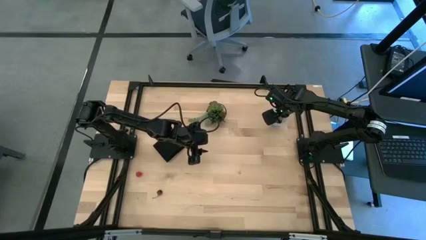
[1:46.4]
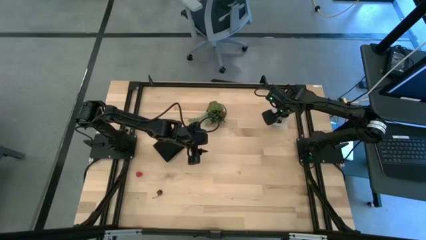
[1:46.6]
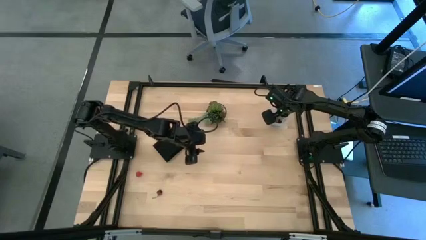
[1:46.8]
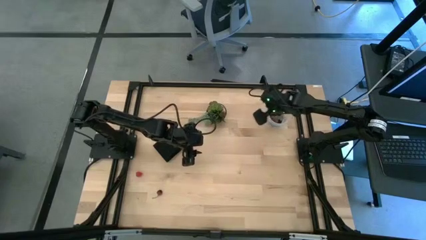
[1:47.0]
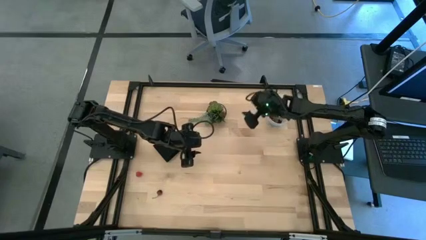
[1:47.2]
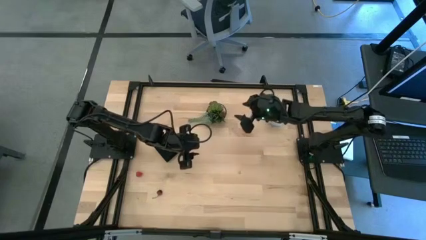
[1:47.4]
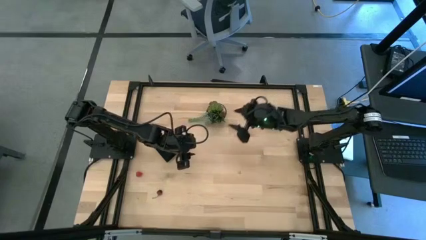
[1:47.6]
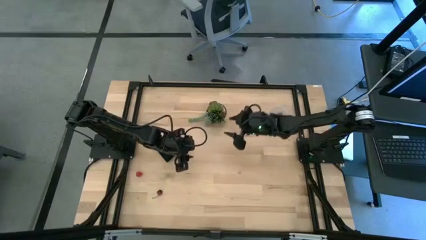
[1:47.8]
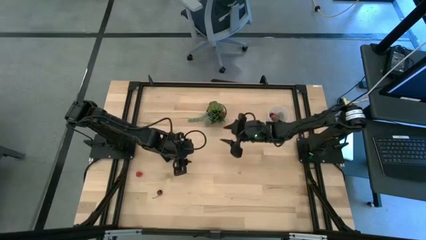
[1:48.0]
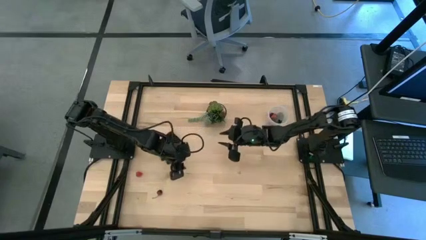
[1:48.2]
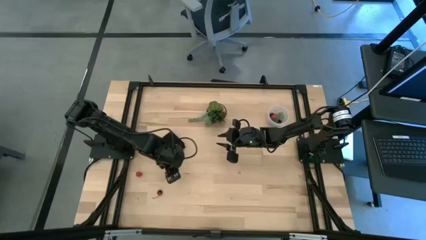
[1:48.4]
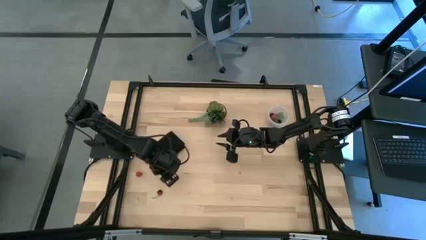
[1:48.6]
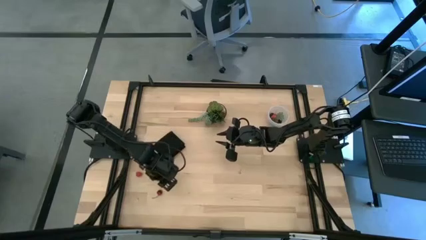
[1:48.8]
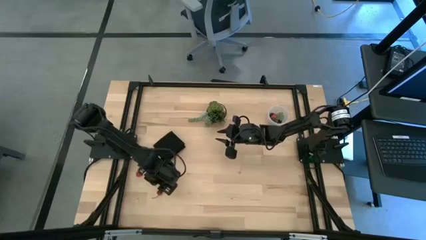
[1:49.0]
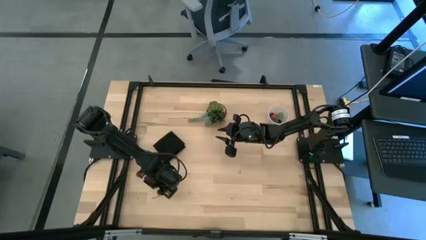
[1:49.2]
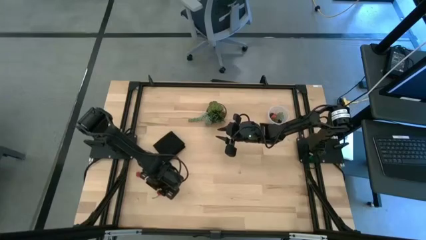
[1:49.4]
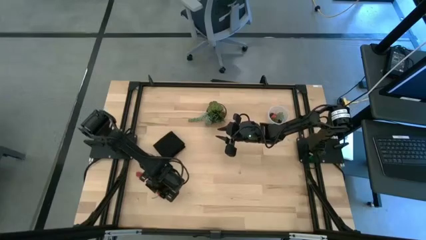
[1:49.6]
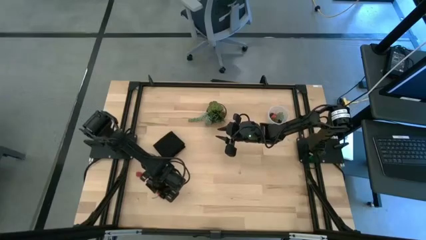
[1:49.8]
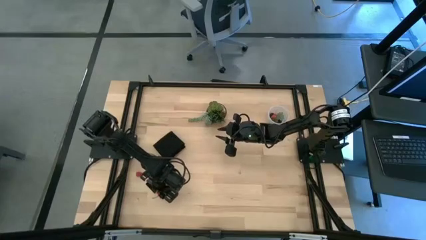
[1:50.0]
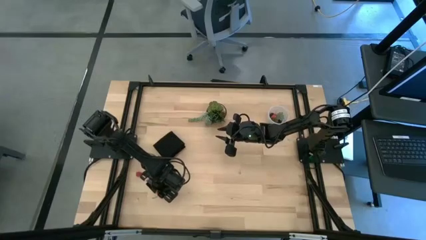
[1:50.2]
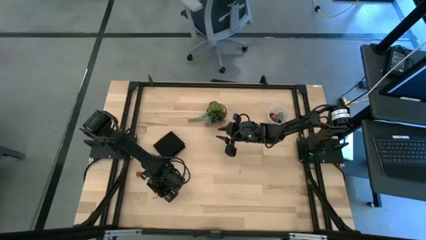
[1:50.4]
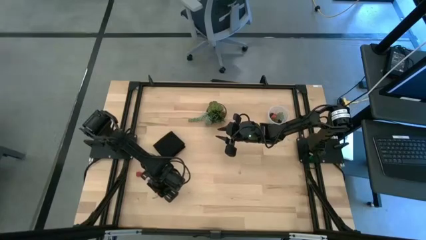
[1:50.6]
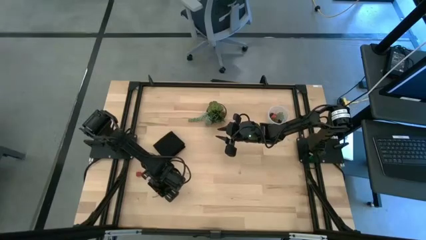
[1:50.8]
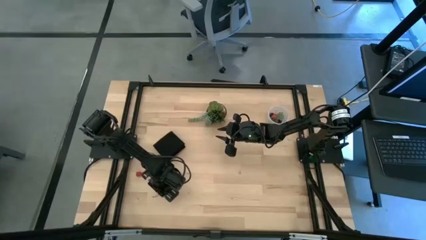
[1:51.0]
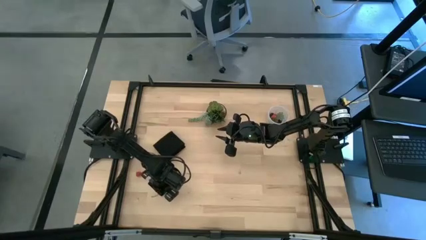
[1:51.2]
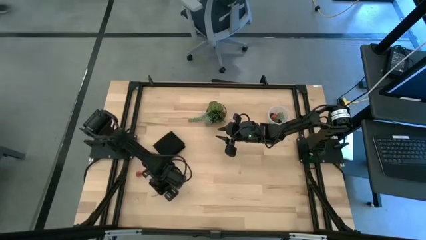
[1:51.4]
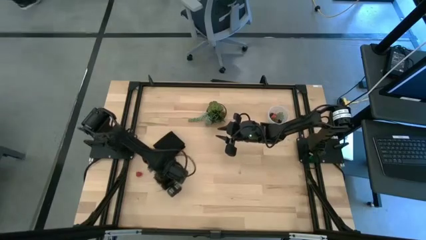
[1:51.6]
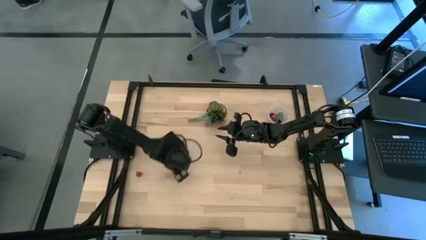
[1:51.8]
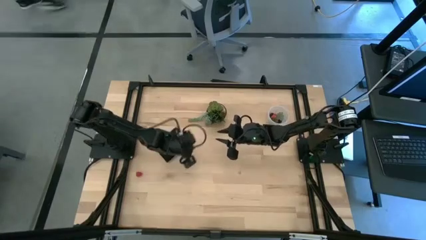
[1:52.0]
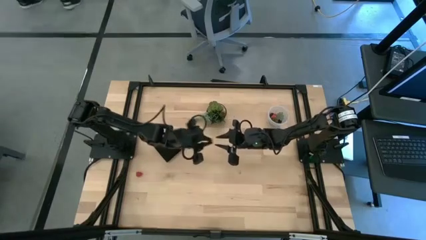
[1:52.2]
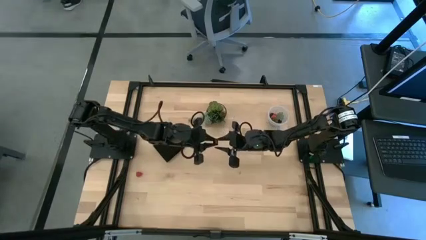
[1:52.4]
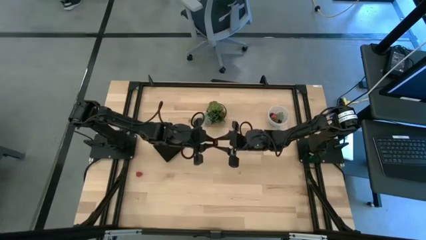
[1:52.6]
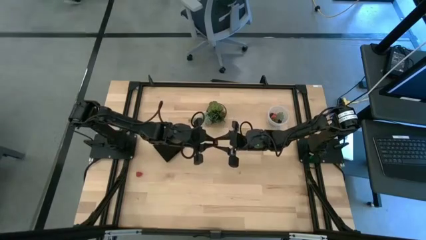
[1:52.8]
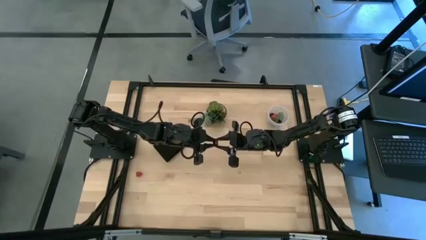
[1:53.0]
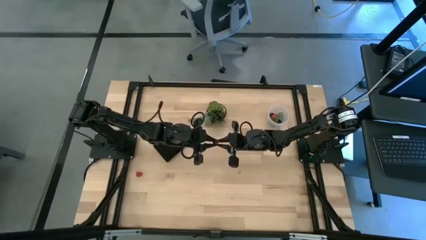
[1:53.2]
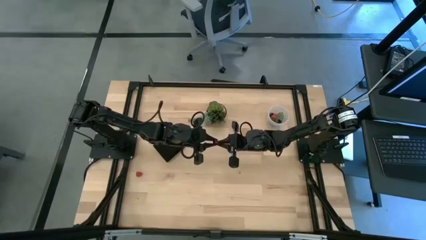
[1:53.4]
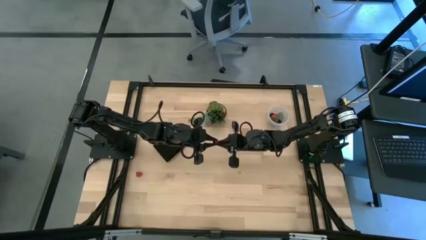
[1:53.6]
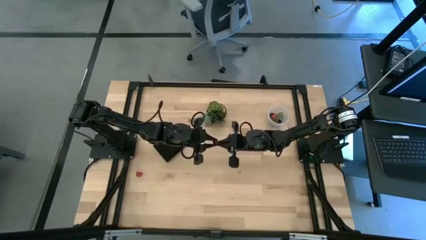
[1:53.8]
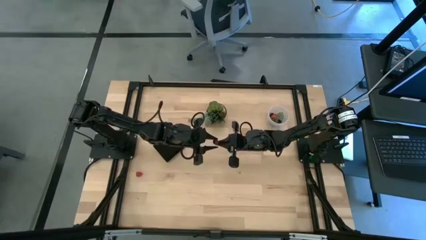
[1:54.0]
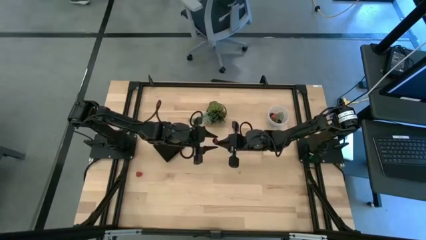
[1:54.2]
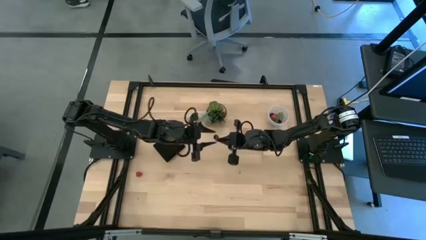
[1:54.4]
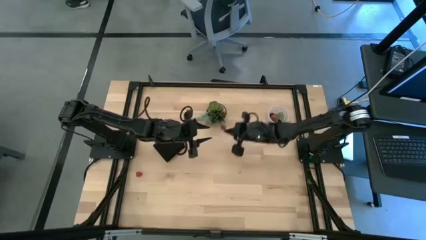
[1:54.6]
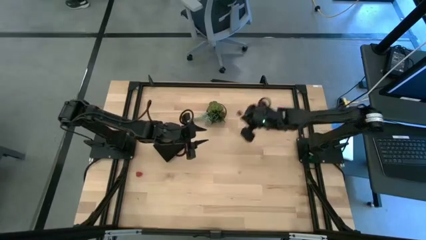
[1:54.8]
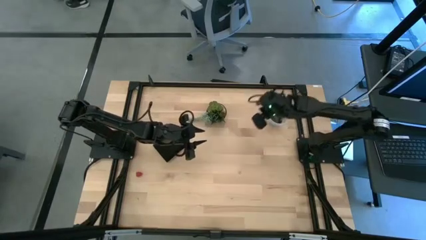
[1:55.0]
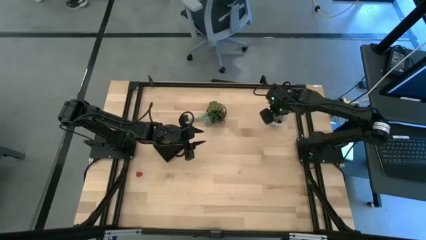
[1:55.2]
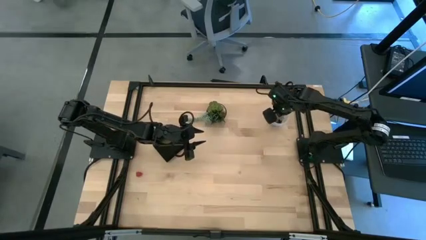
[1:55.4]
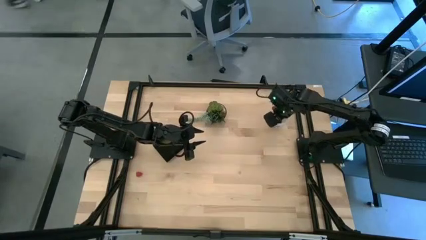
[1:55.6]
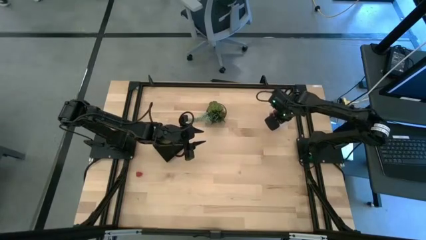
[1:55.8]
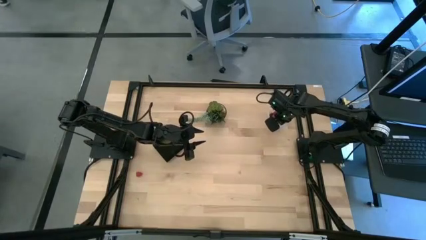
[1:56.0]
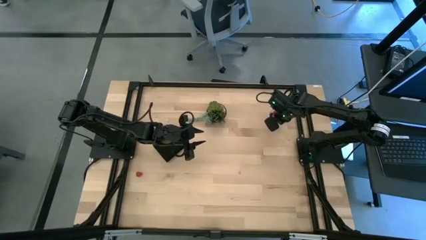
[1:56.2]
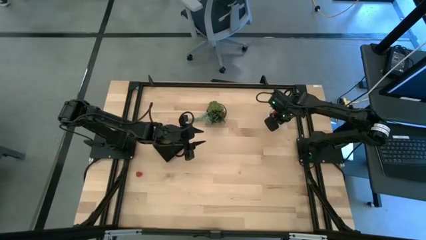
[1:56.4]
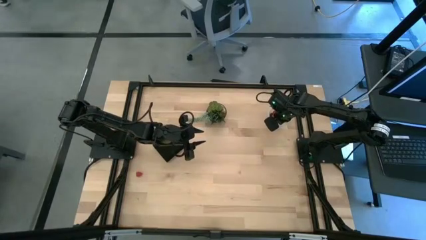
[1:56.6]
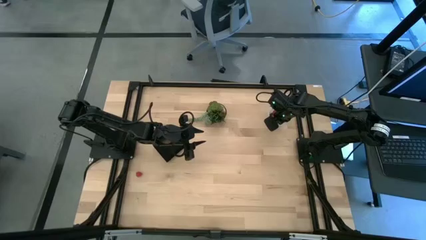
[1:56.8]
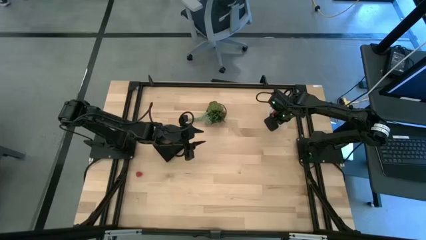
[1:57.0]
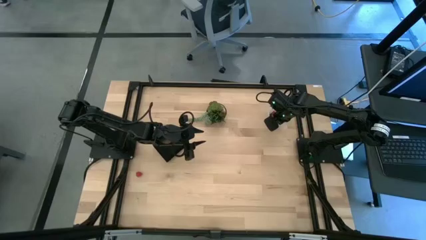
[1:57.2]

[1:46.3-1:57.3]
Task: Pick and placing Produce into tupperware
Put the red cherry into the bin

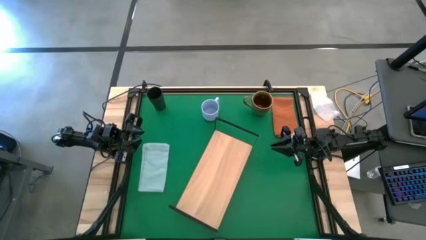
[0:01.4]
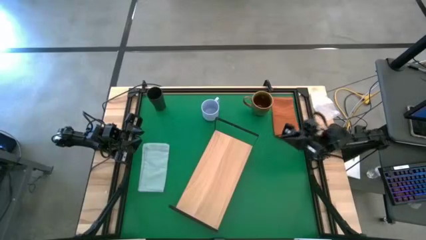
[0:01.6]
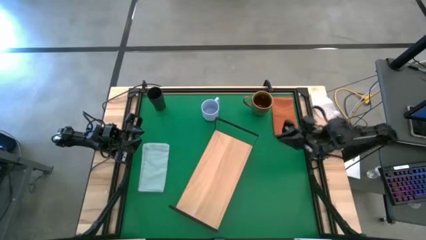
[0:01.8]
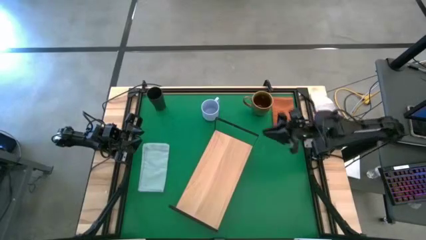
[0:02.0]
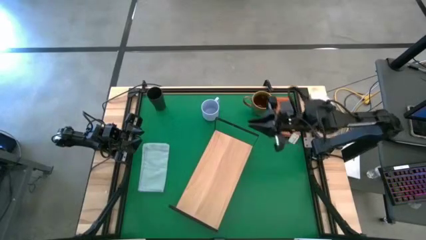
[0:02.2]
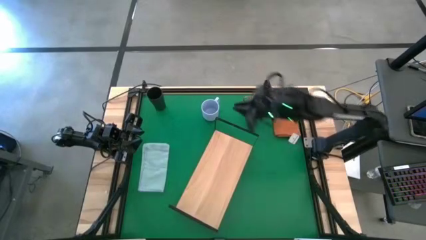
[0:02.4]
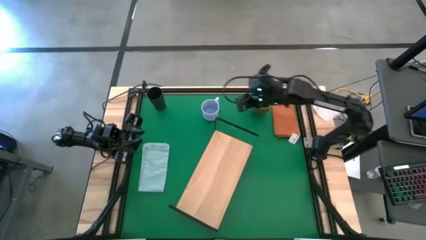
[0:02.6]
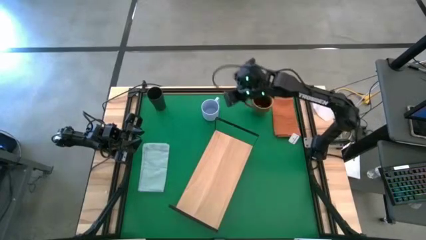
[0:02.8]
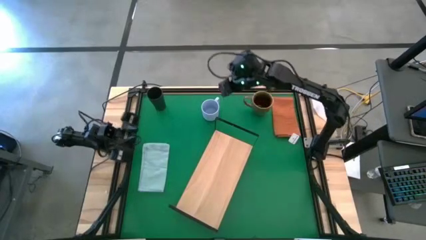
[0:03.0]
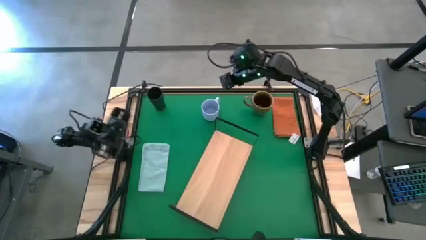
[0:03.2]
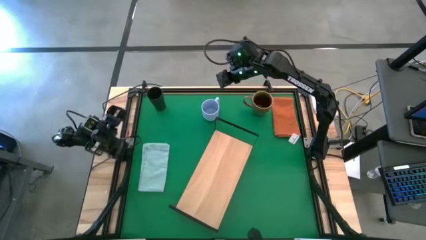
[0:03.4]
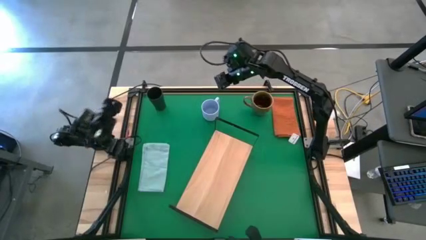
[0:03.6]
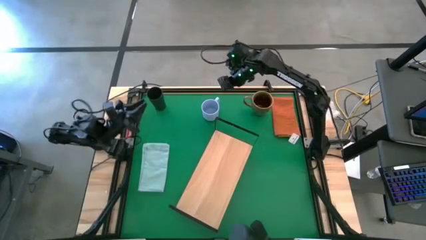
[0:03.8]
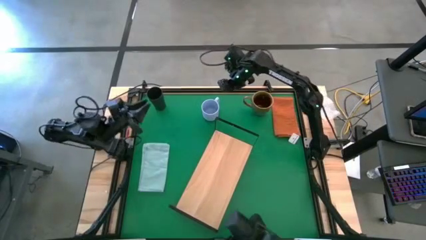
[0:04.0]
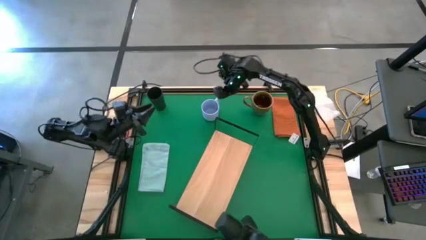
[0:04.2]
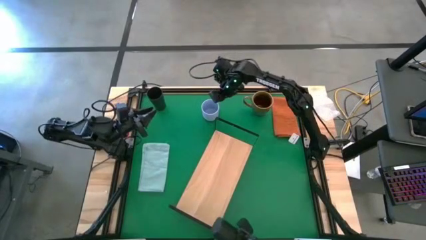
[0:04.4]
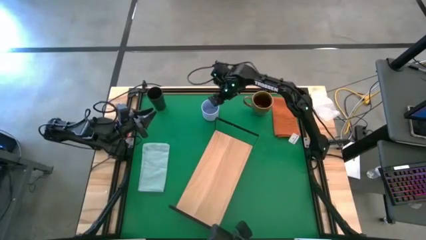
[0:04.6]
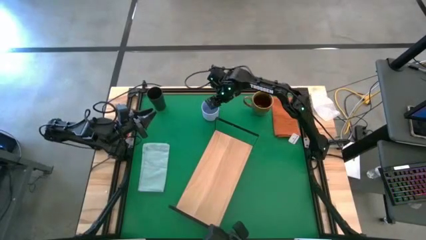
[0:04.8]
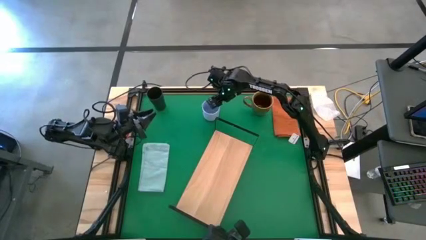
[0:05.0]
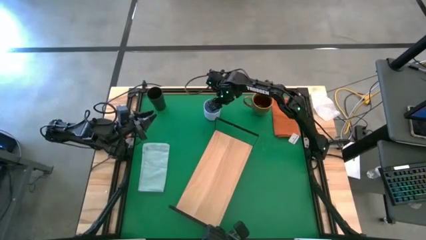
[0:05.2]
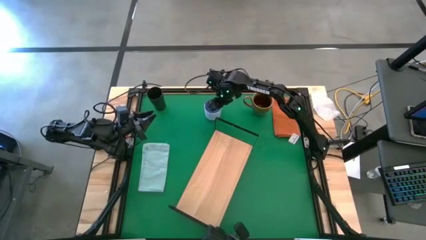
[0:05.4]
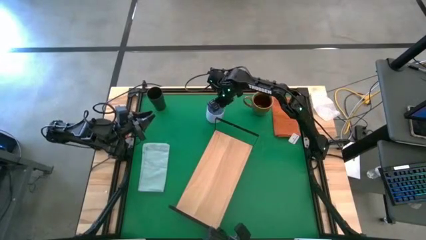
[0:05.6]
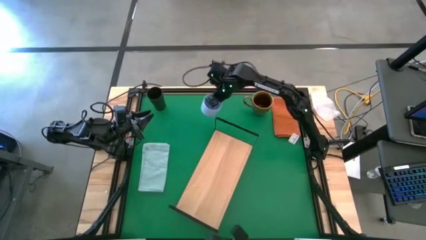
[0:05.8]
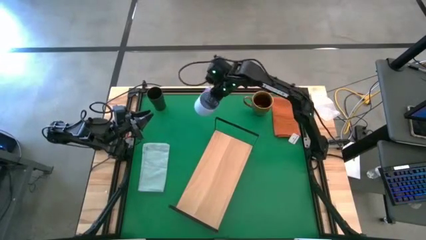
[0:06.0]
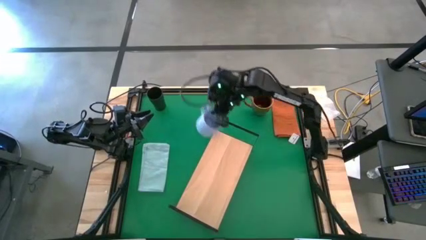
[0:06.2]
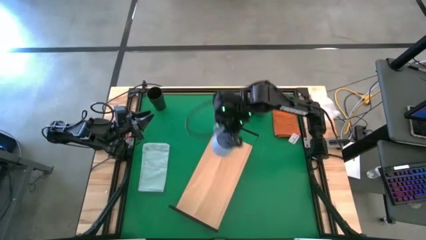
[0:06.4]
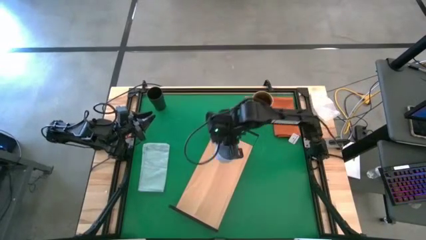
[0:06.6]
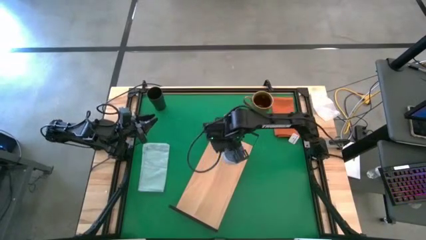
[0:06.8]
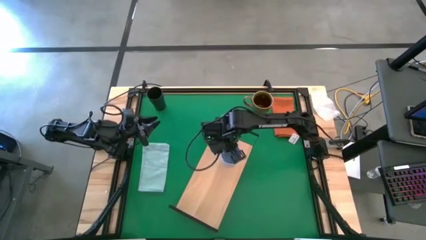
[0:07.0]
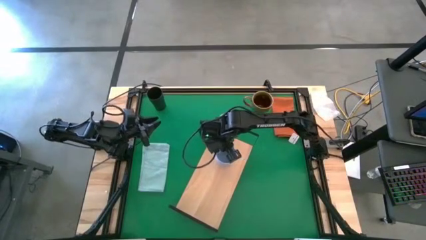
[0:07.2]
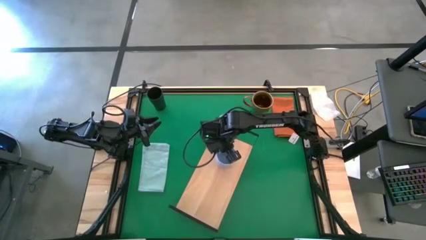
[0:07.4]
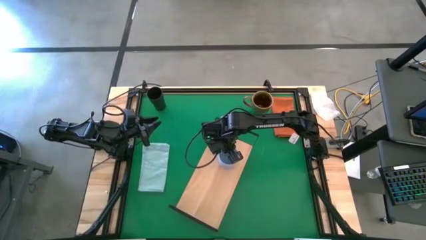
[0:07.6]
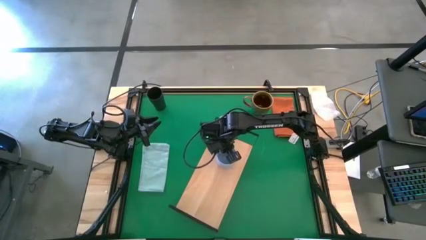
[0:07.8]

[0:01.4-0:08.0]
Task: Stack small to large cups/mugs on shelf
Put the blue mug on the shelf
